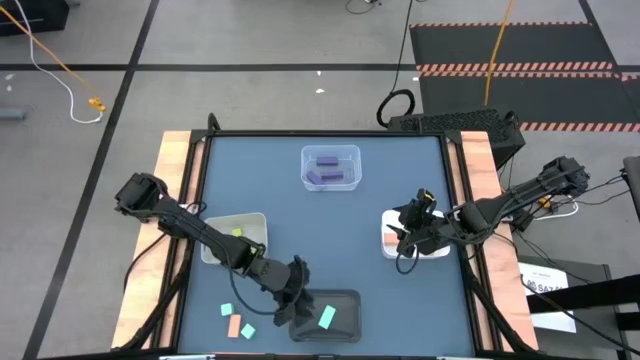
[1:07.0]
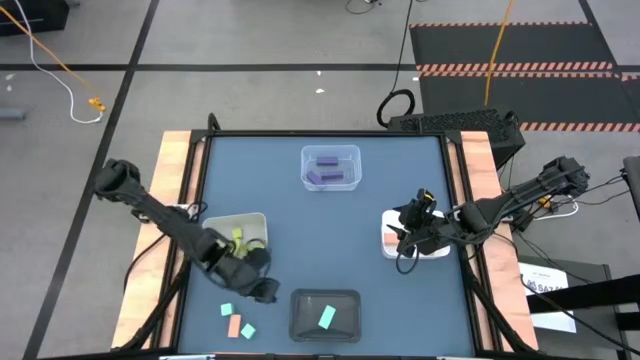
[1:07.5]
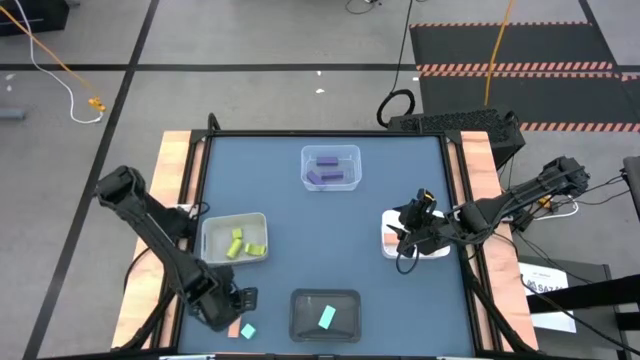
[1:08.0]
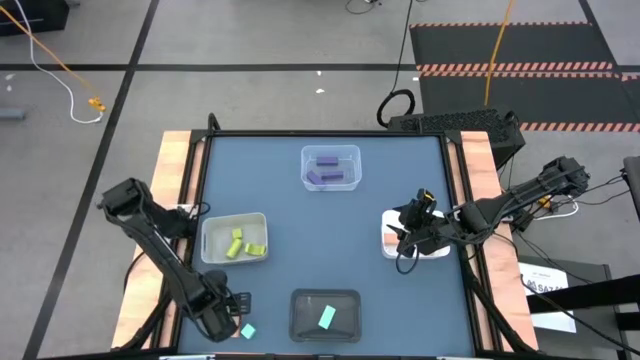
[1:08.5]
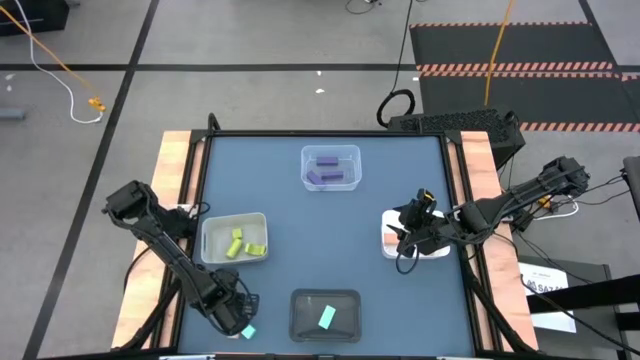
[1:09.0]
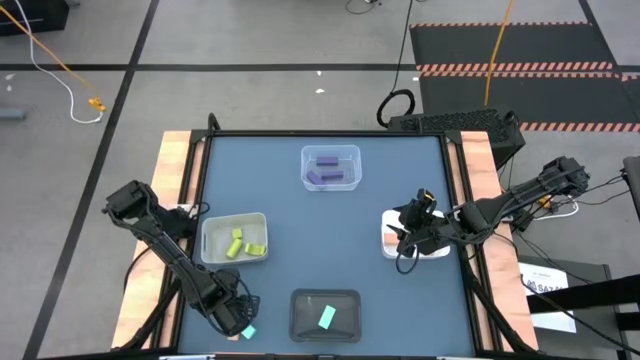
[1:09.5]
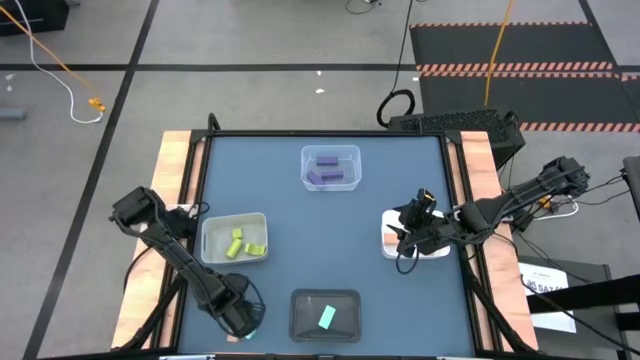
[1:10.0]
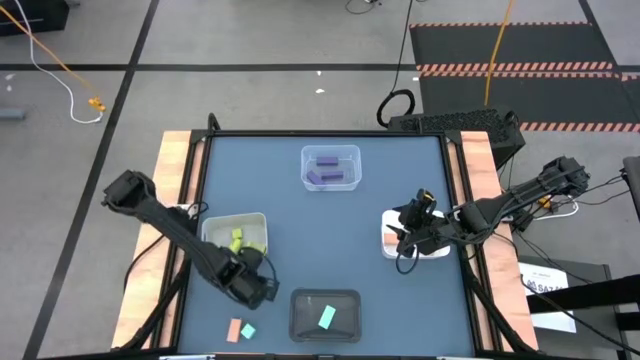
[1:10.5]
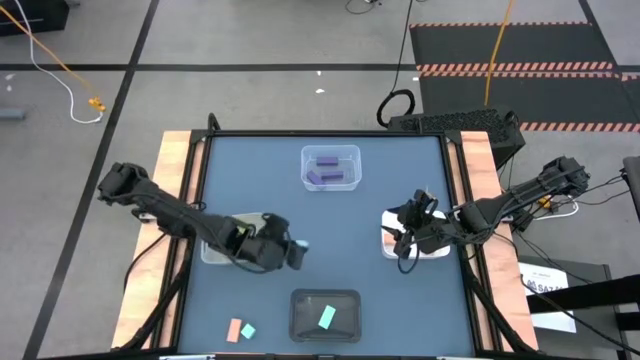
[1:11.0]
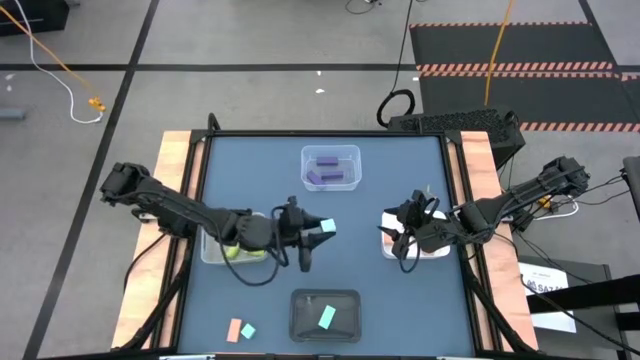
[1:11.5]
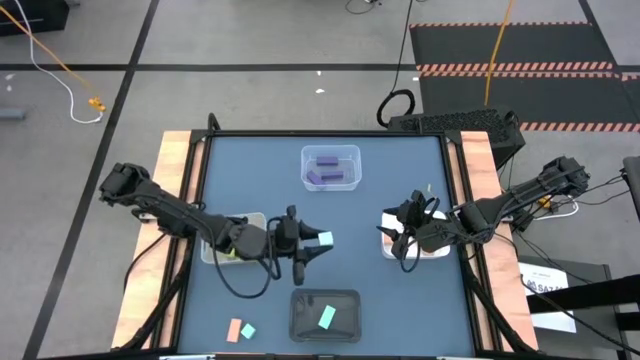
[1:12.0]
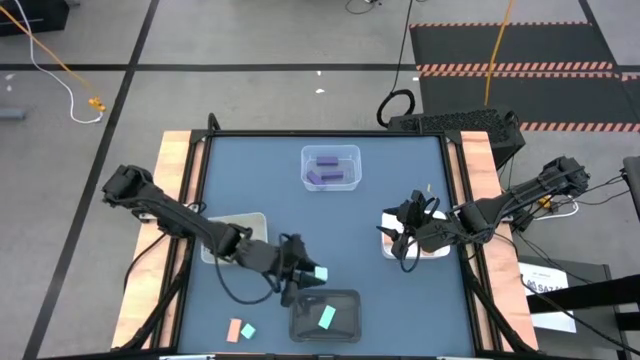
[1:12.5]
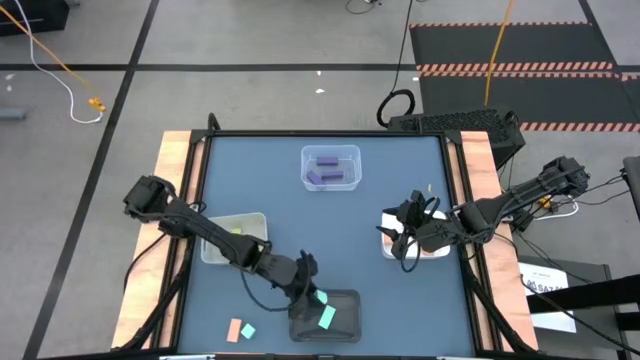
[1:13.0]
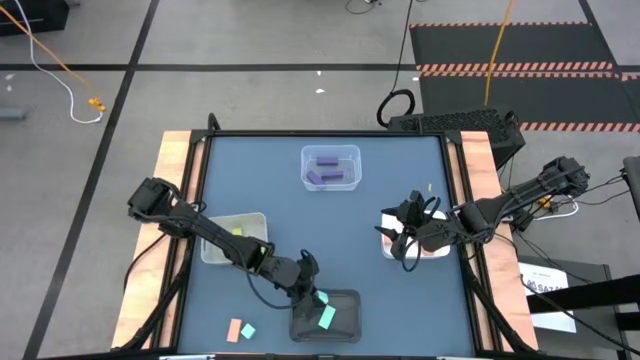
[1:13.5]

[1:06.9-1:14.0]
Task: Sort & place blocks by color
Put the left light blue block into the black bin

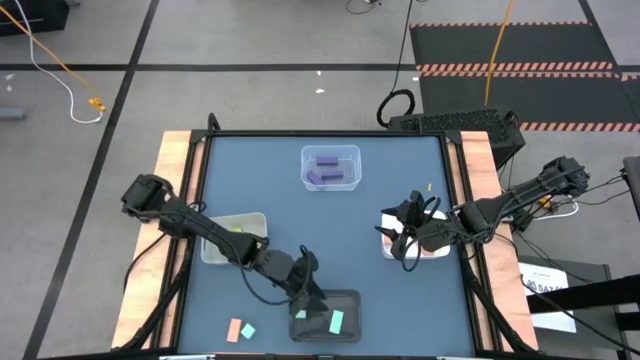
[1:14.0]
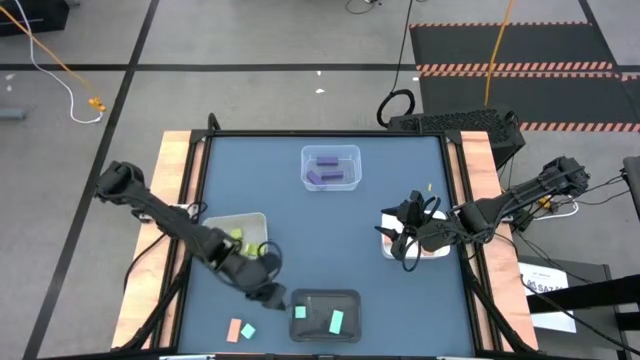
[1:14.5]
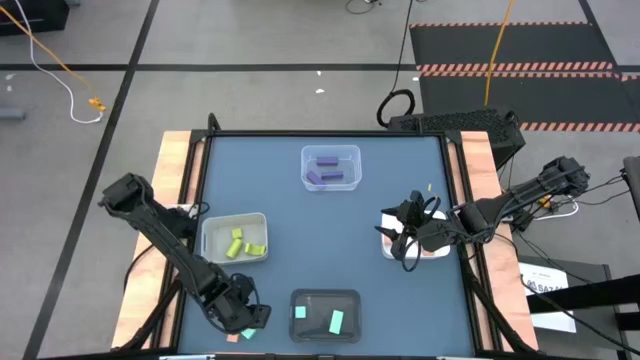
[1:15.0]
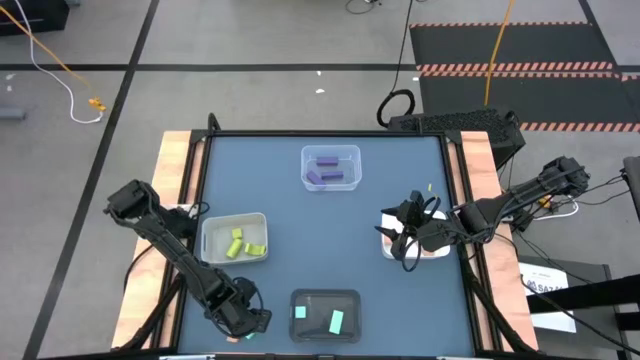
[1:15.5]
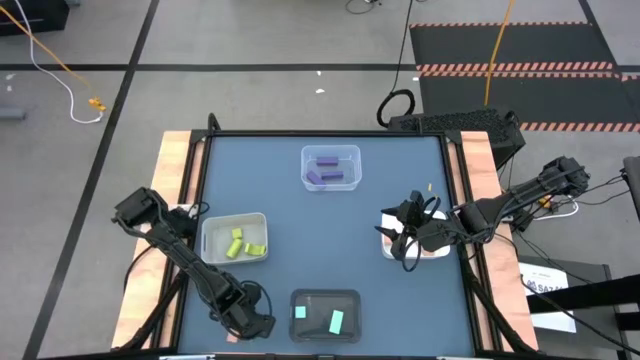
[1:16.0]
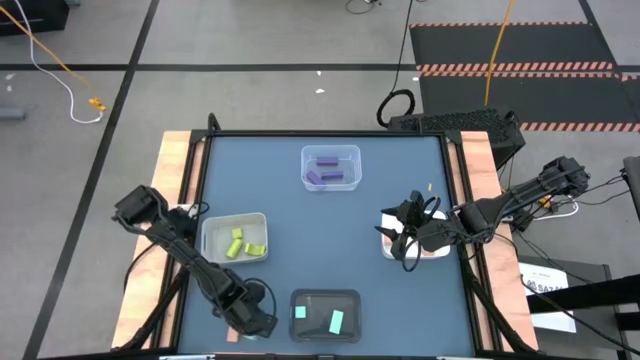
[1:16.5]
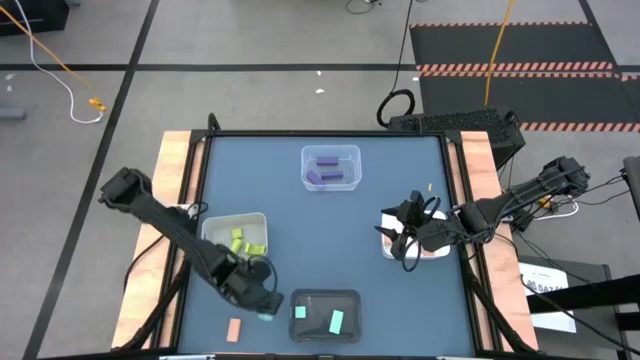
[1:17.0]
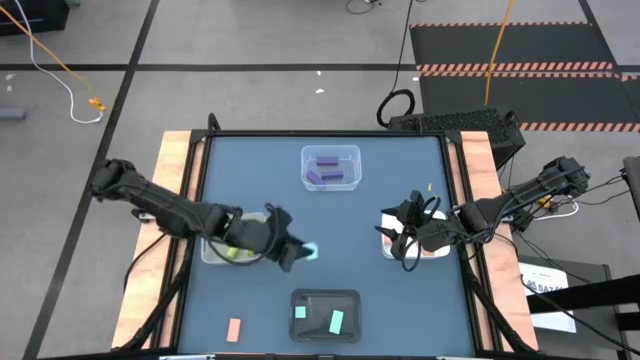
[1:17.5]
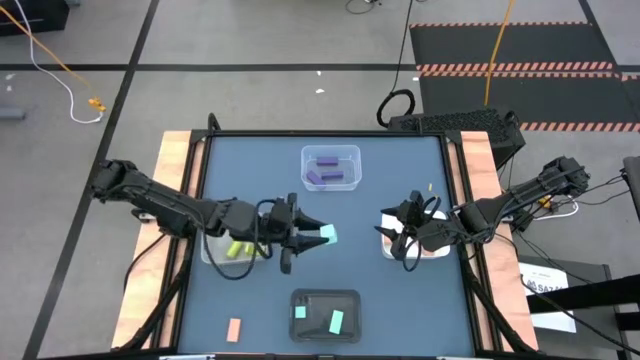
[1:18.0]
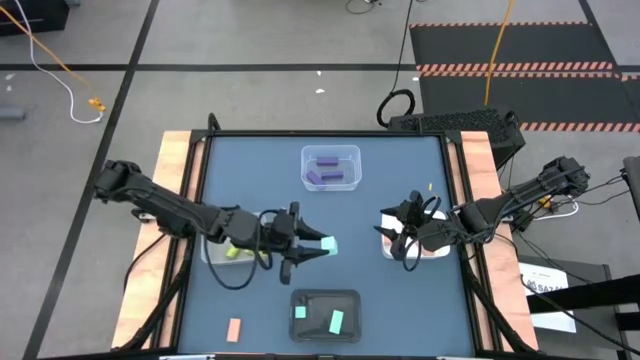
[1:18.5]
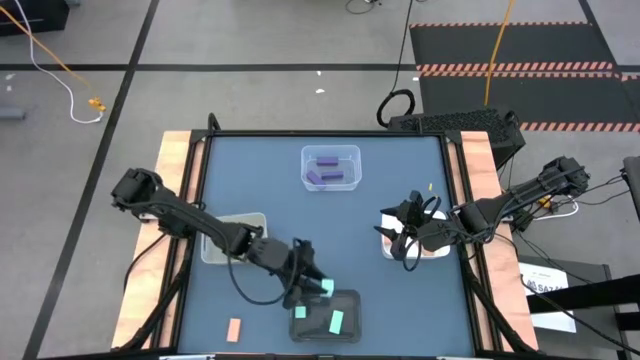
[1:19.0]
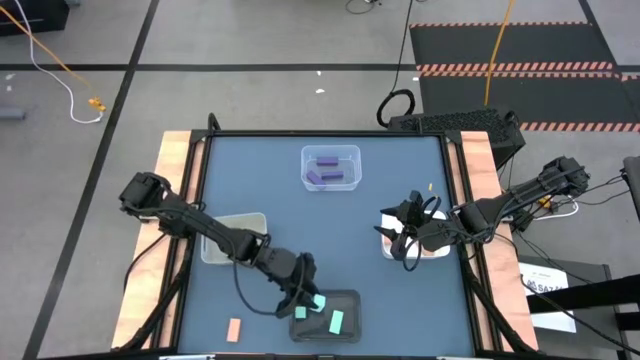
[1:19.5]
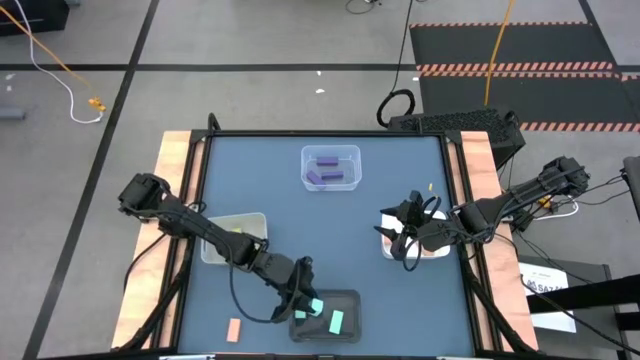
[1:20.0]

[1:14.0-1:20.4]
Put the light blue block into the black bin

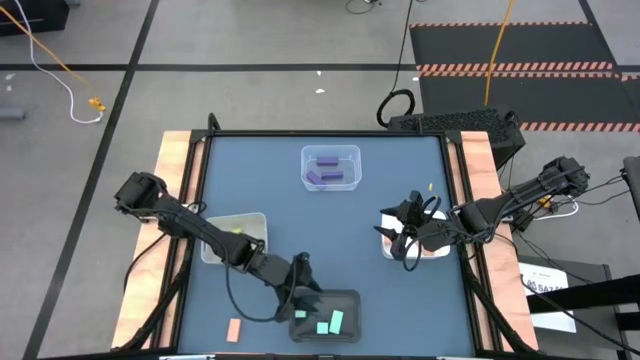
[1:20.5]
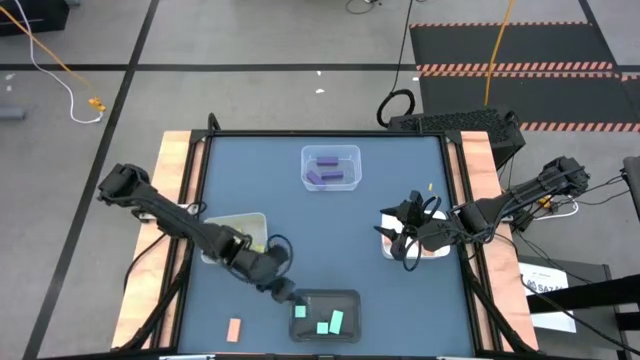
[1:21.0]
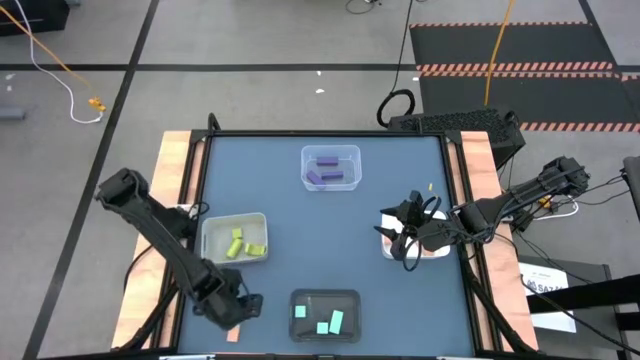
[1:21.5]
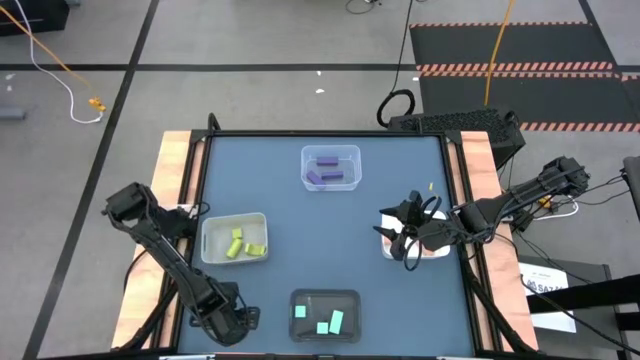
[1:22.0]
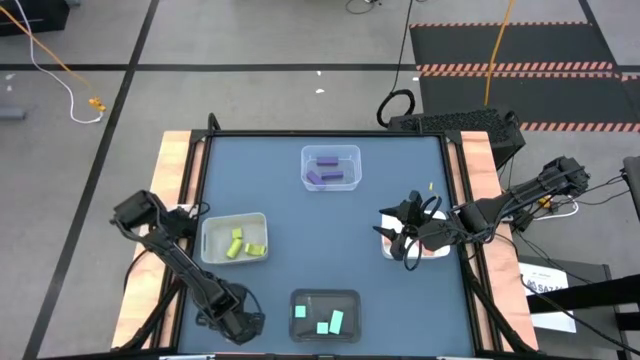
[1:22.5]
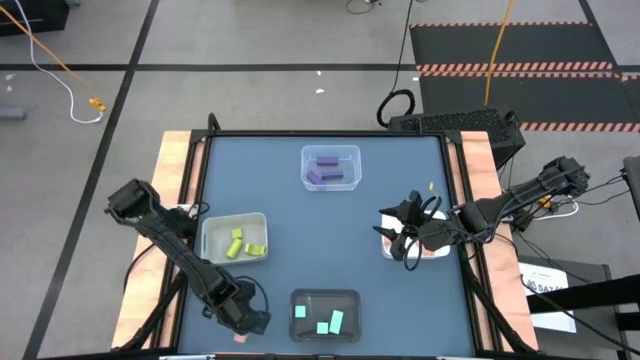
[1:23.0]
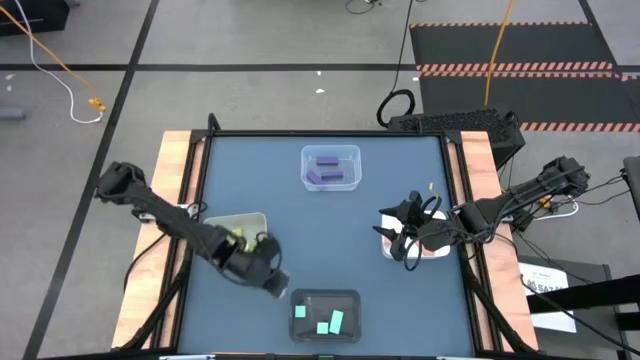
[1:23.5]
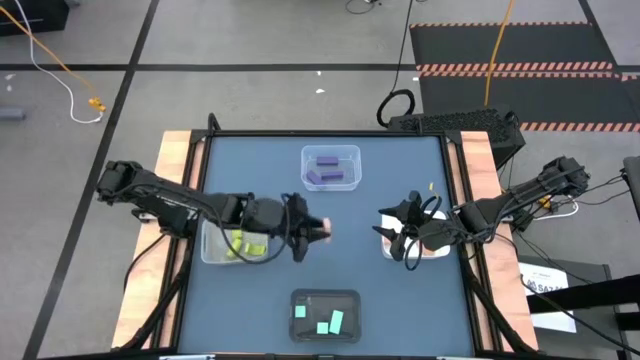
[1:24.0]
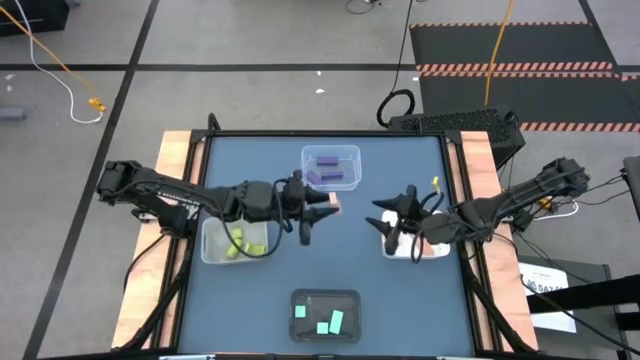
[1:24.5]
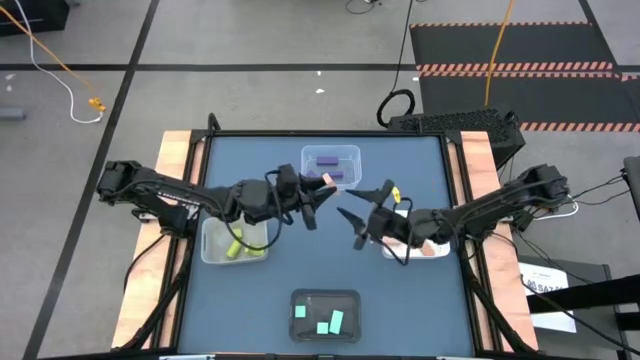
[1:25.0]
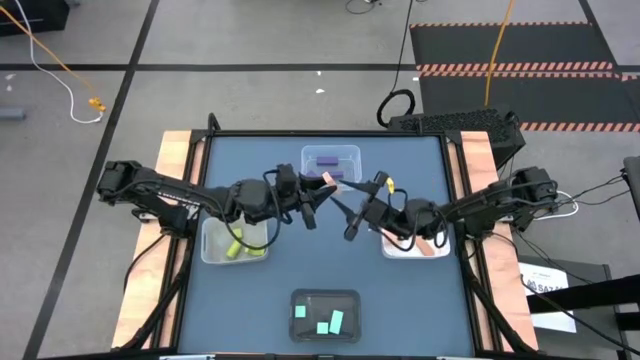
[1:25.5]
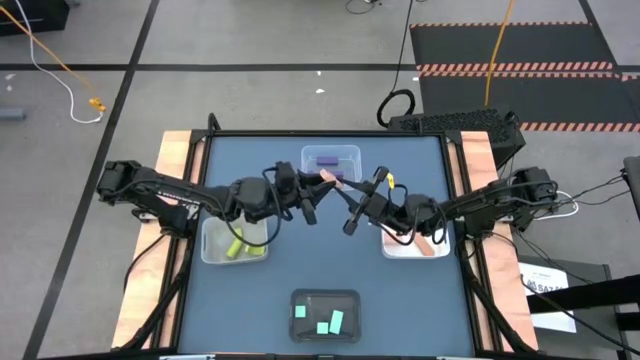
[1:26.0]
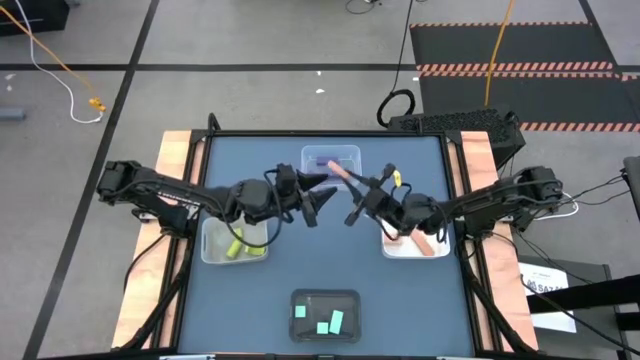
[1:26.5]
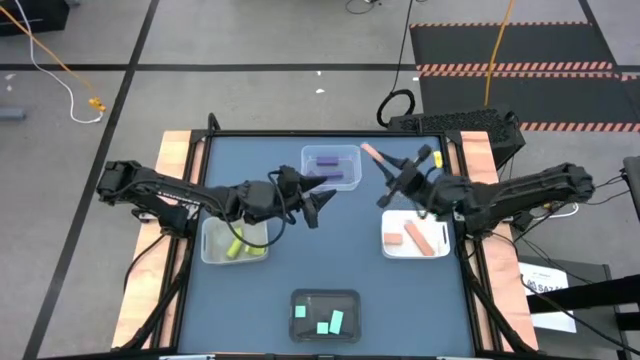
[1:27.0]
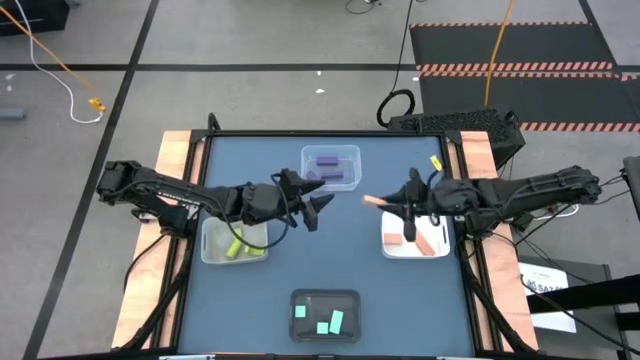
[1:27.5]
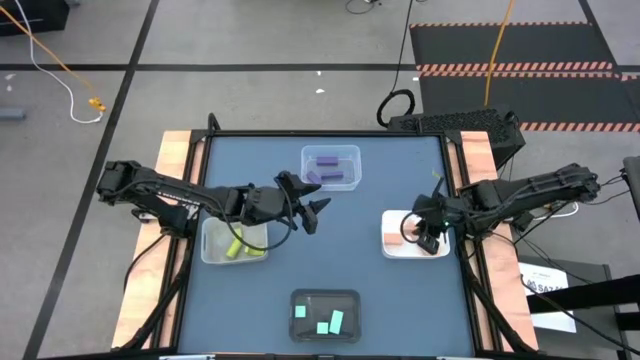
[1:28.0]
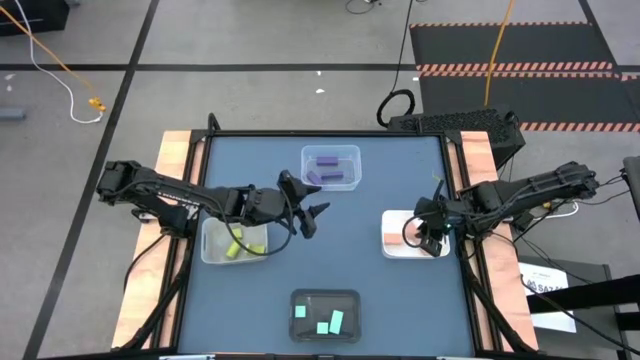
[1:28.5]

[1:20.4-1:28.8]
Put the brown block into the white bin
